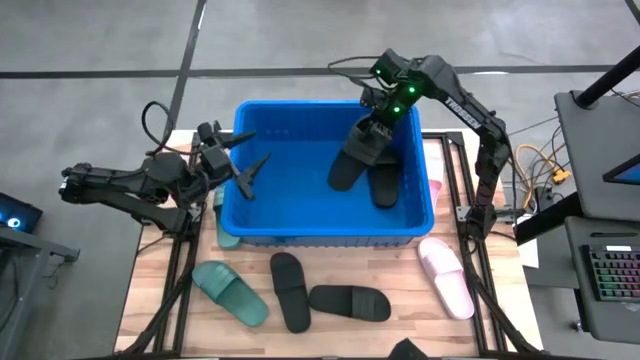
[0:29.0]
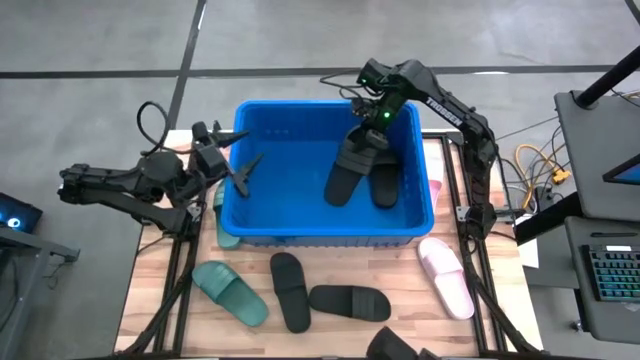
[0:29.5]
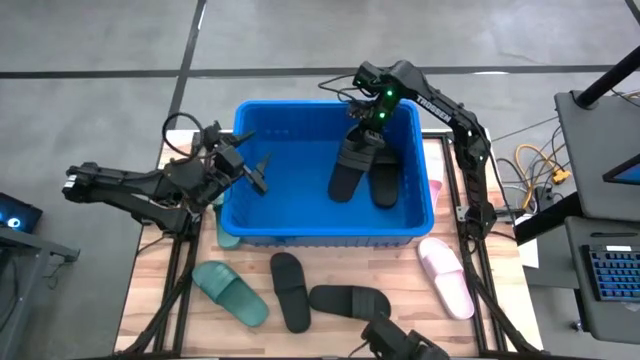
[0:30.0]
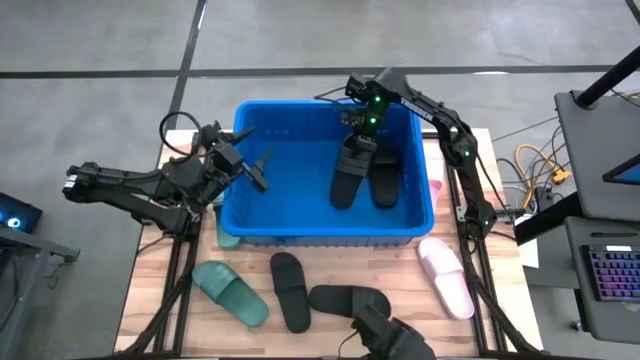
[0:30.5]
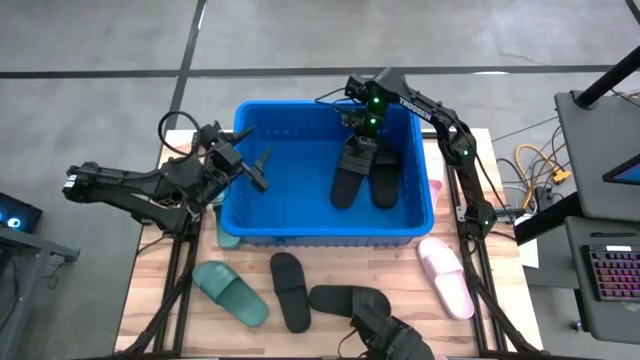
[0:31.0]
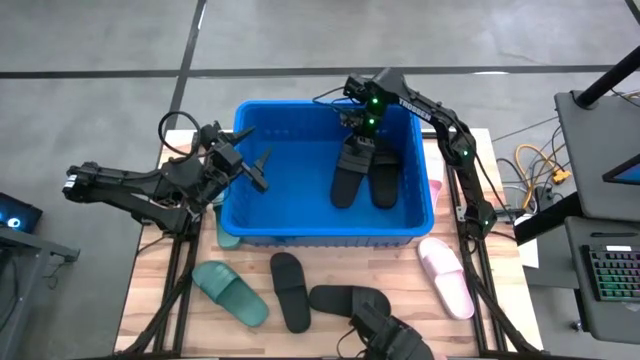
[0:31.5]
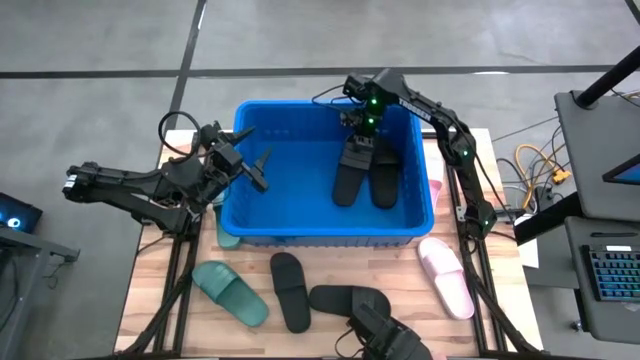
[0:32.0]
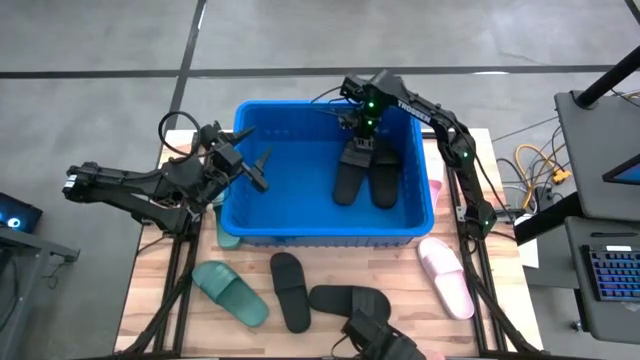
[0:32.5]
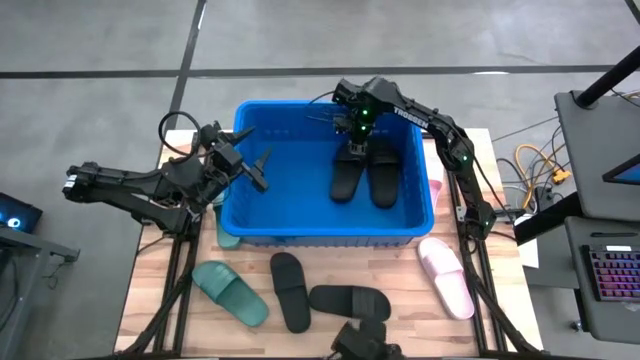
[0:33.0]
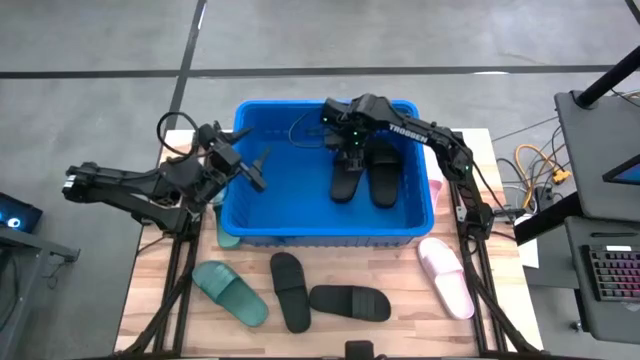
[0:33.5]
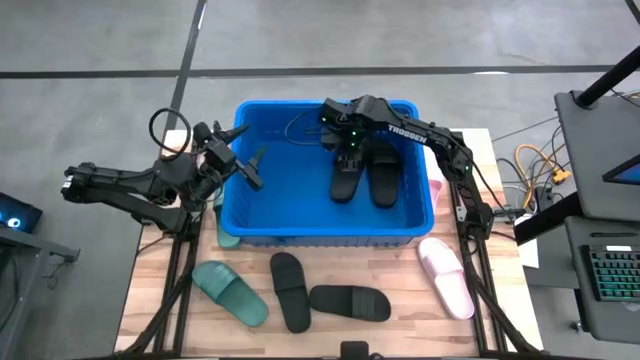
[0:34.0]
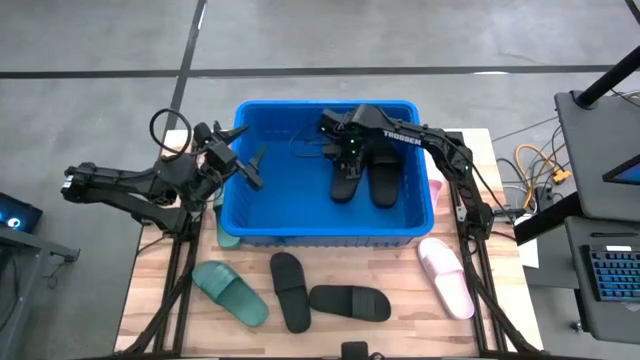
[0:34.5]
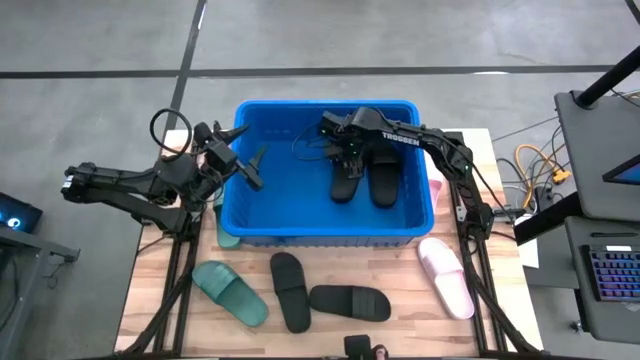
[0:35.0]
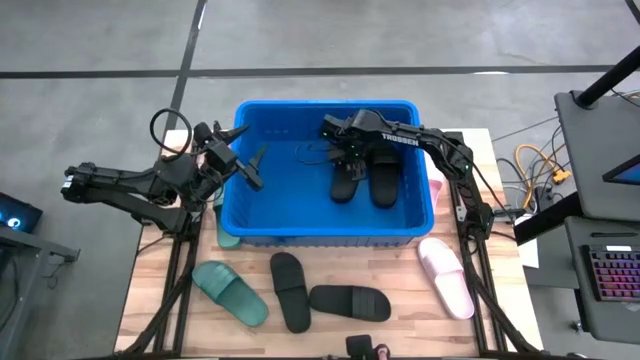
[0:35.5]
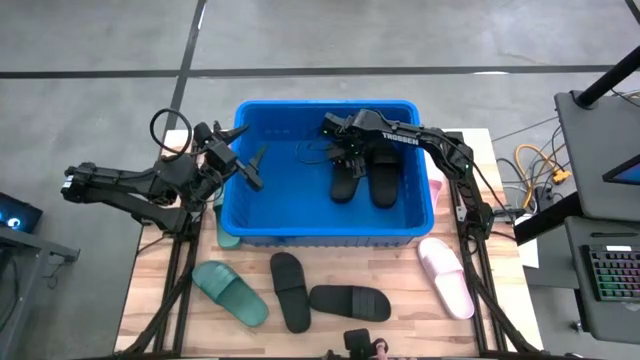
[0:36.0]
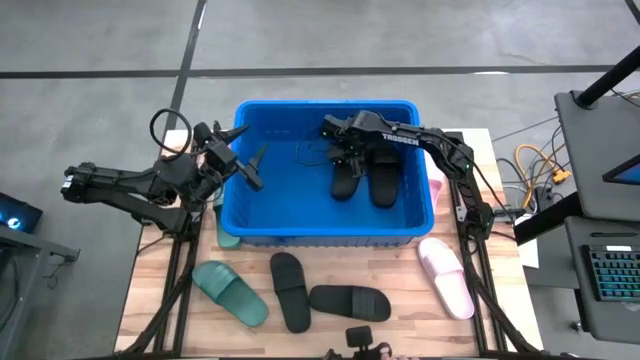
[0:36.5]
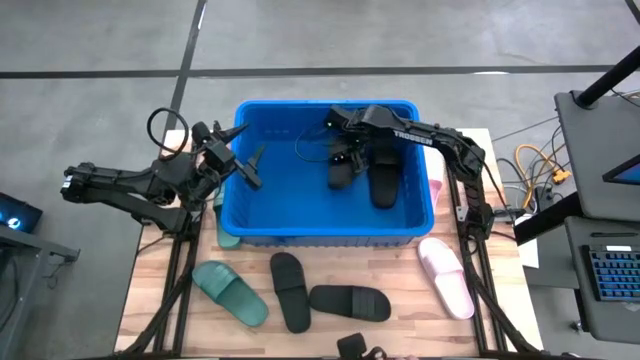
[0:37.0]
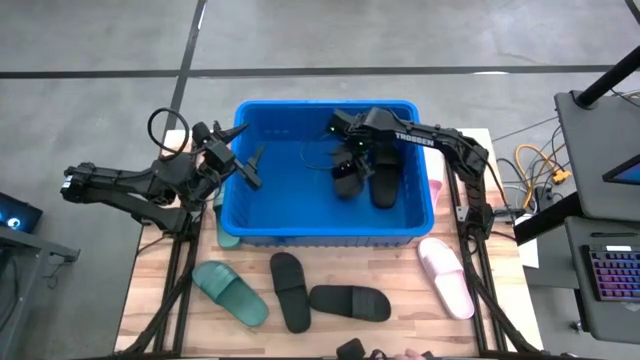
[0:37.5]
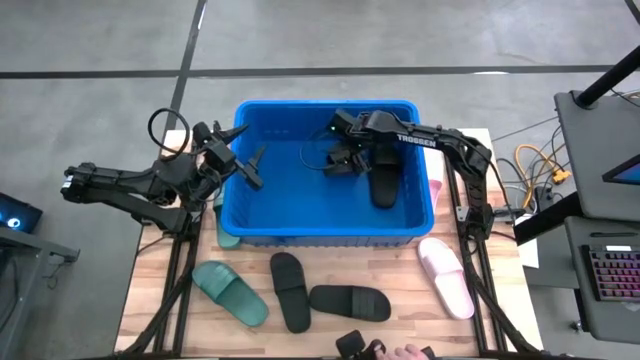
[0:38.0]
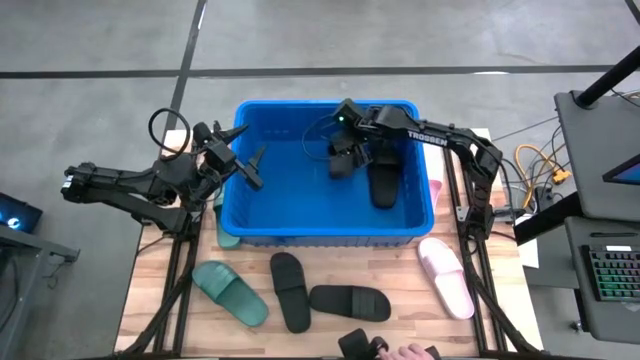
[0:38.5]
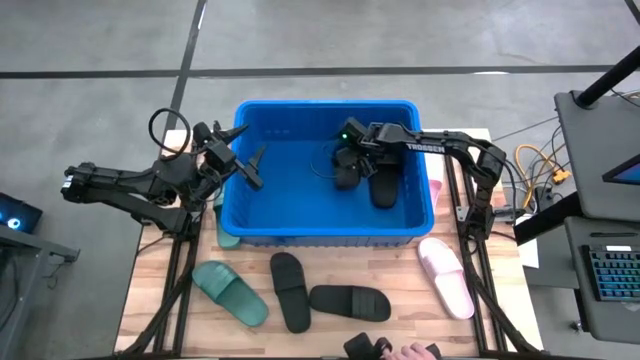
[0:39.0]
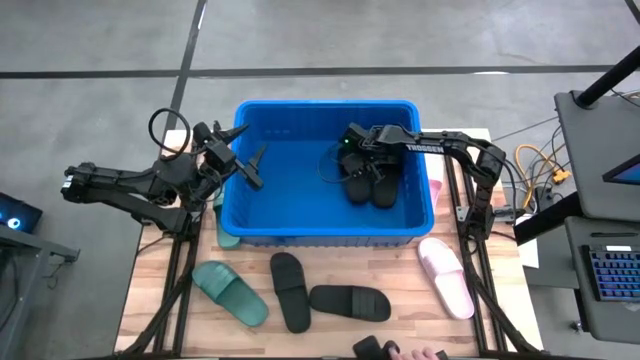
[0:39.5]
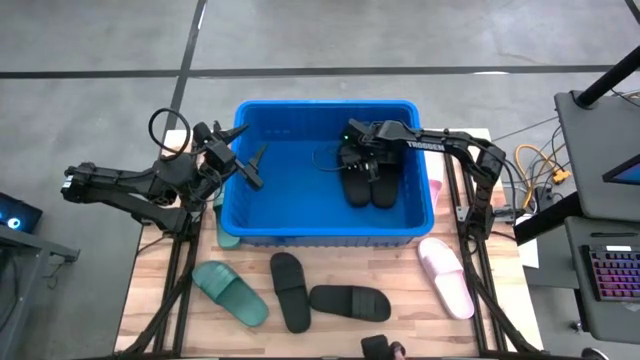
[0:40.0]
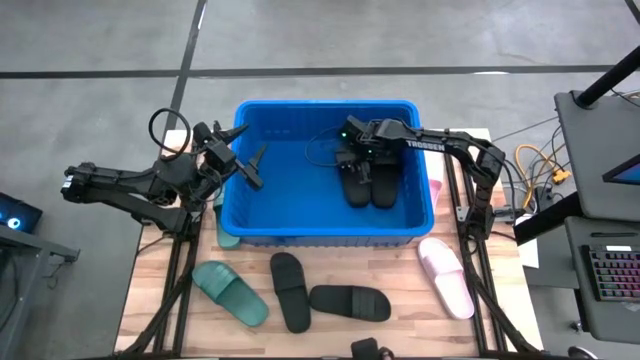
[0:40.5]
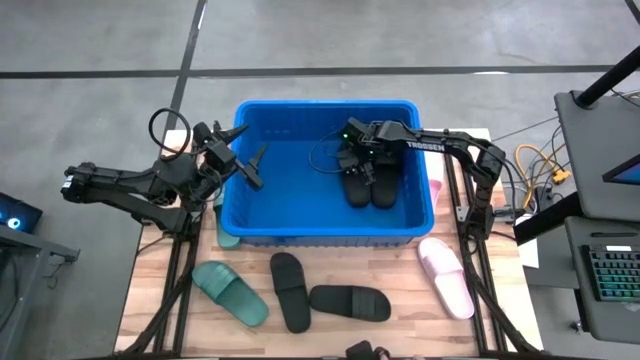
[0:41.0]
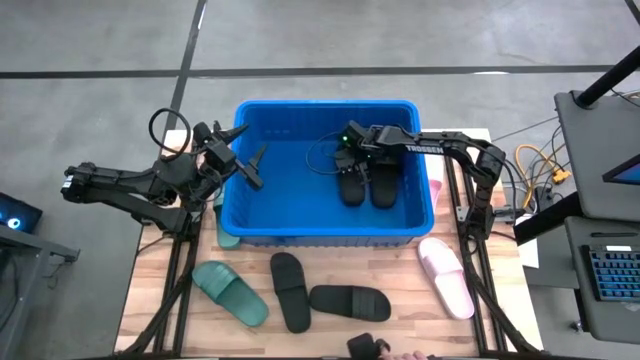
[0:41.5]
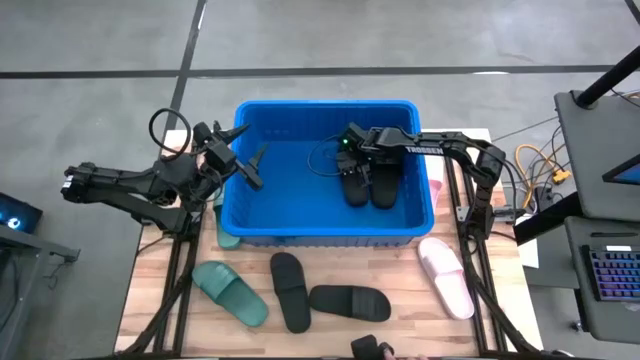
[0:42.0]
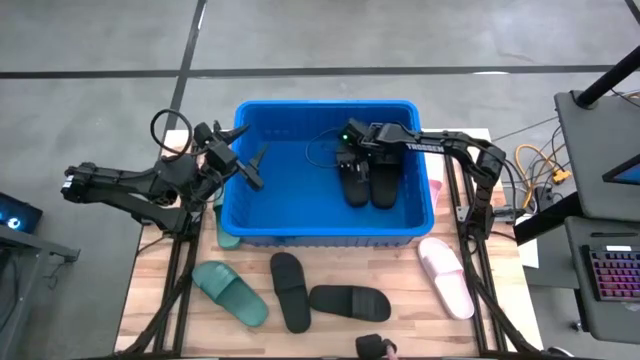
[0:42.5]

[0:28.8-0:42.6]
Task: Pick and place slides into bin
Put the black slide into the blue container

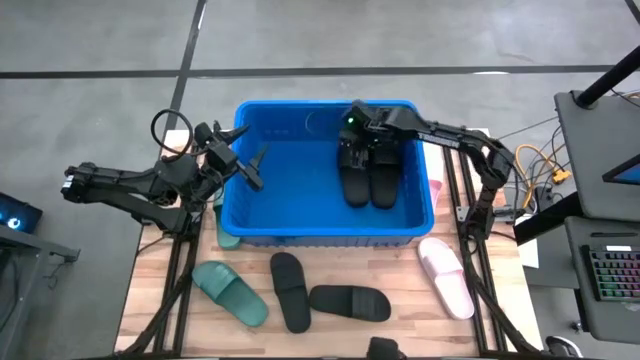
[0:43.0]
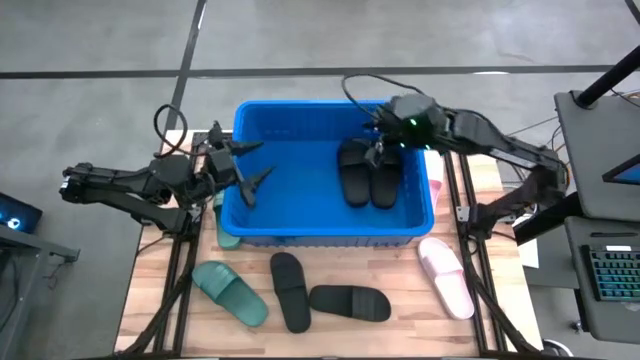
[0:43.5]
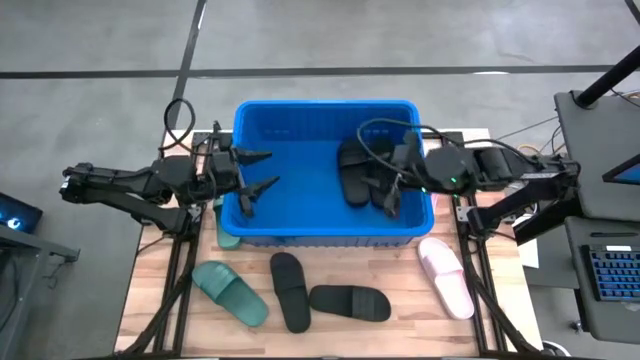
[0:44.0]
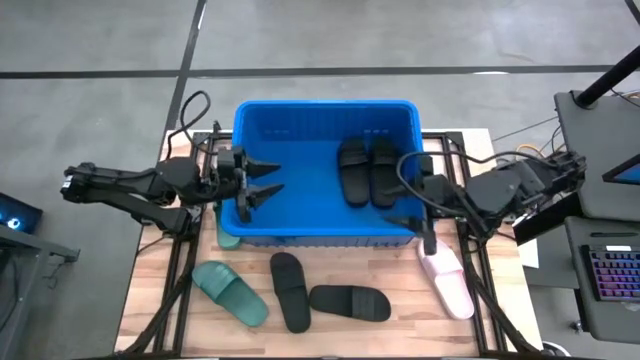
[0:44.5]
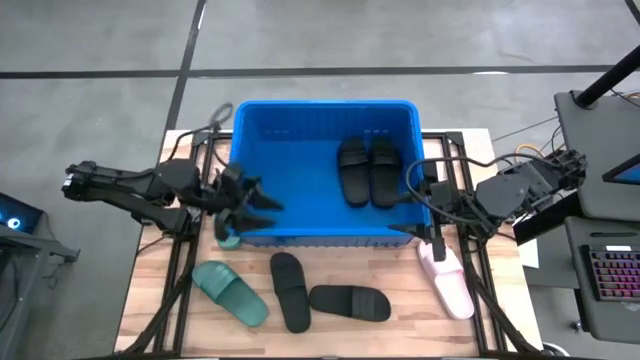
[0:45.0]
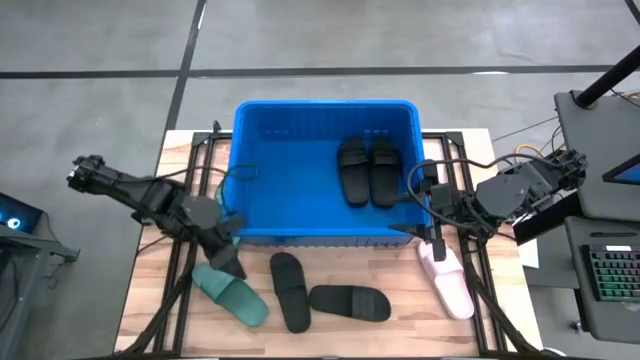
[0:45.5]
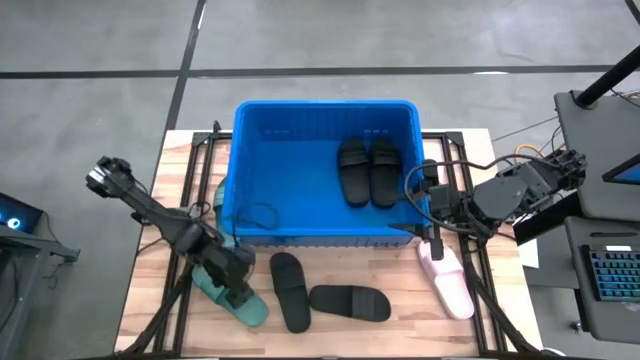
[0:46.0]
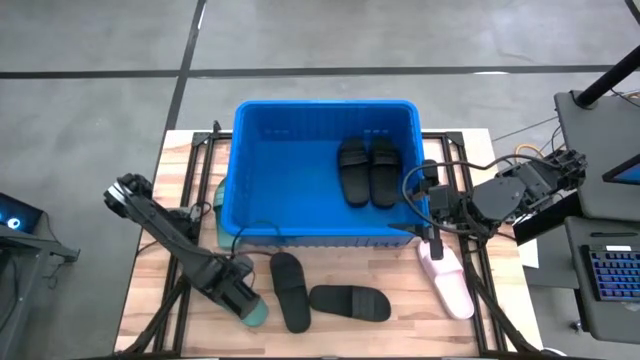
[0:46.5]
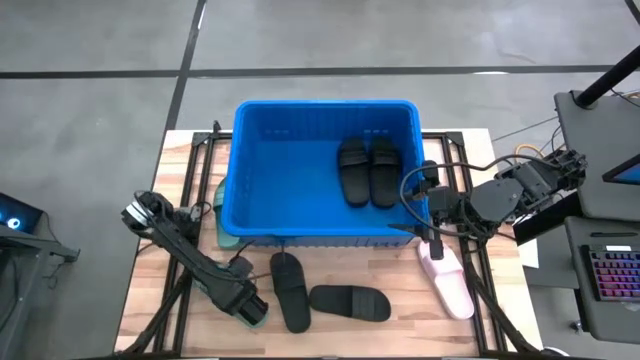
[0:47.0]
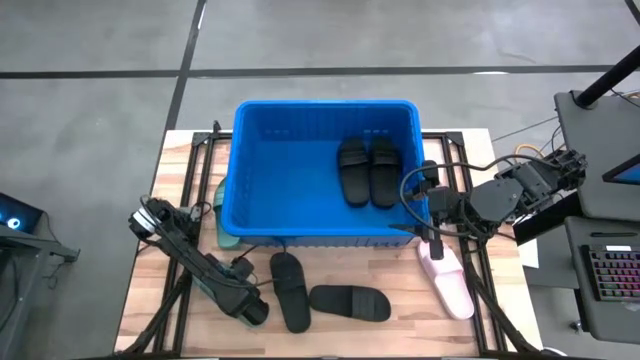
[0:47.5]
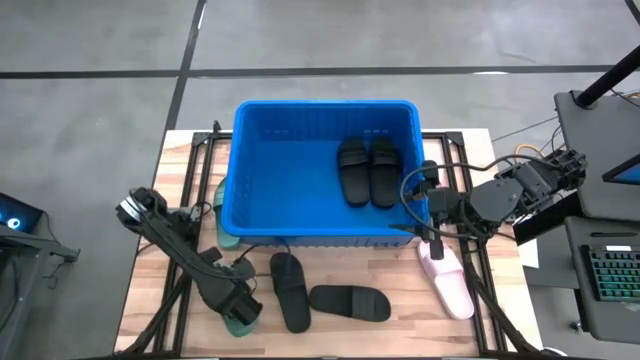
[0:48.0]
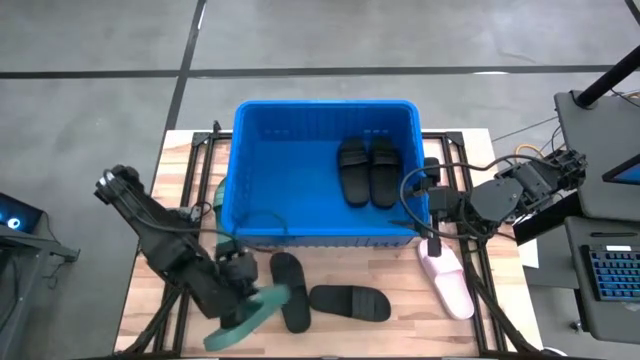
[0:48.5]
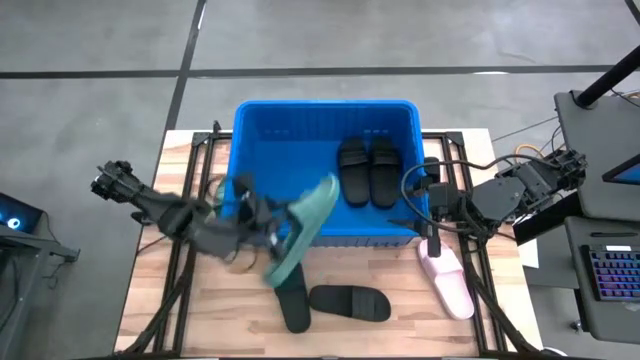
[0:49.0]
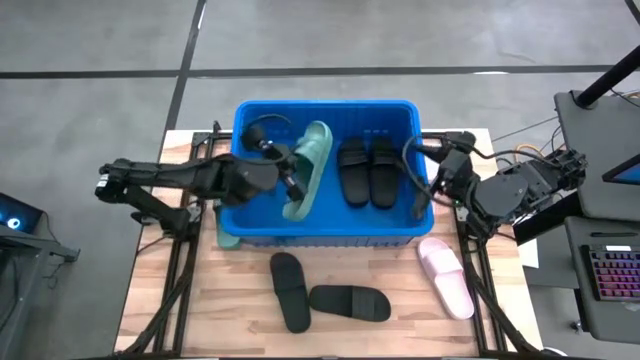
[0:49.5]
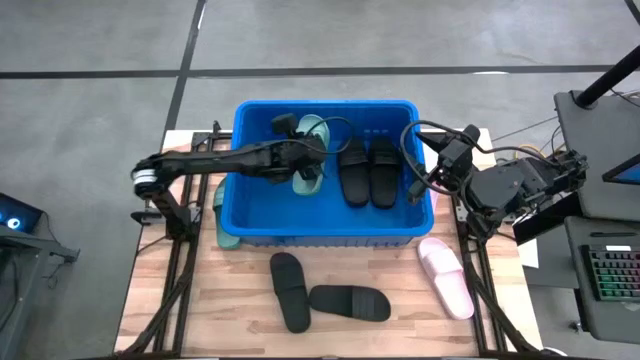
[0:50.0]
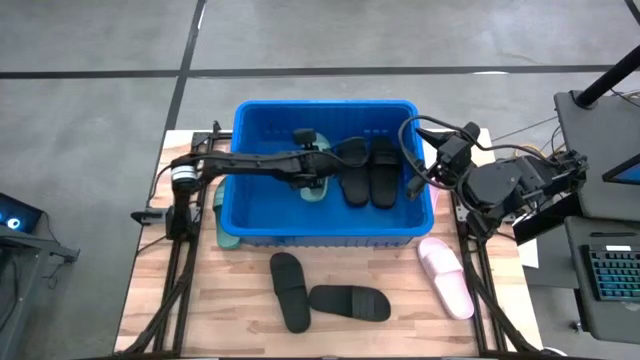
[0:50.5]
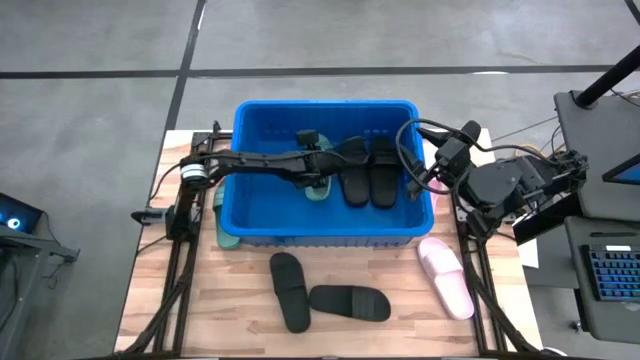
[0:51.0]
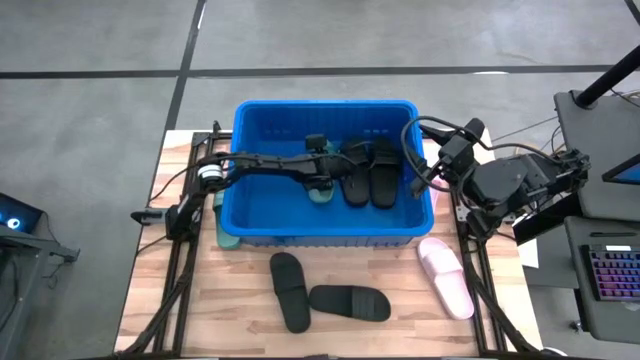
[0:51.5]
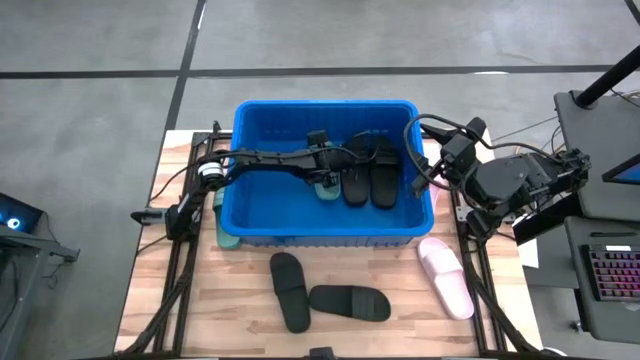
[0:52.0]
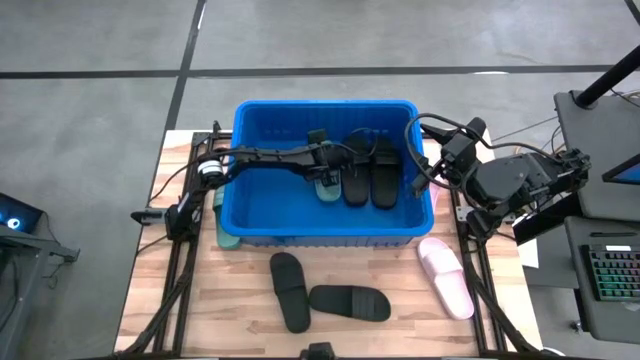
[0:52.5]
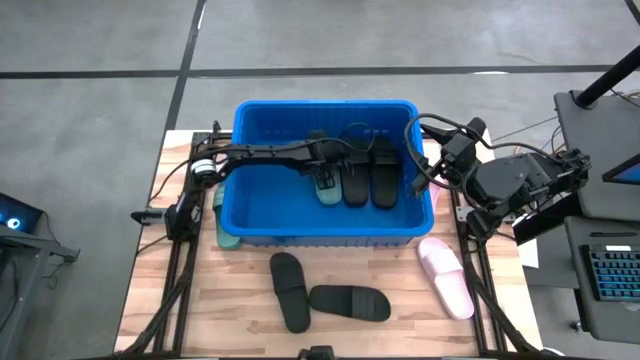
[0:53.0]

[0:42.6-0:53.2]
Put the bottom green slide into the blue container
